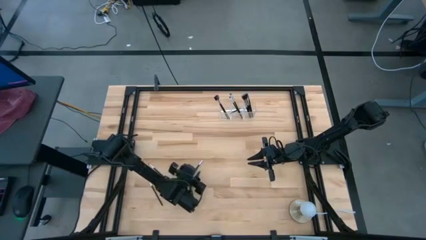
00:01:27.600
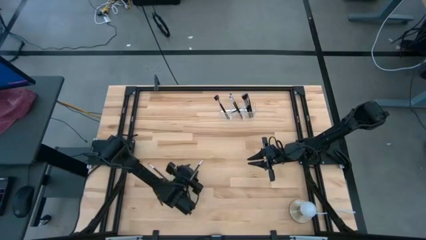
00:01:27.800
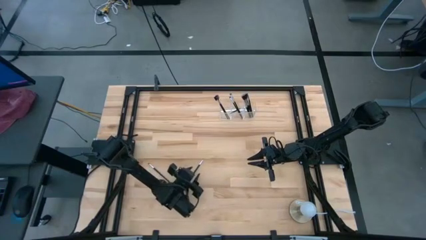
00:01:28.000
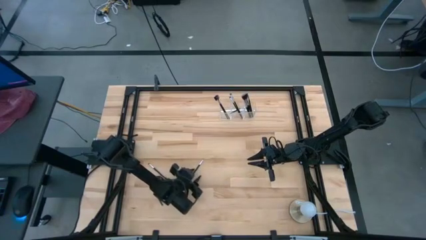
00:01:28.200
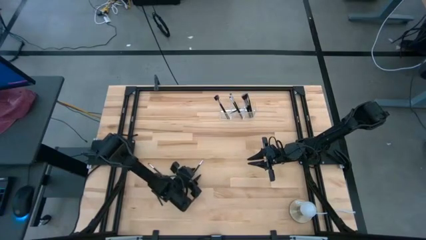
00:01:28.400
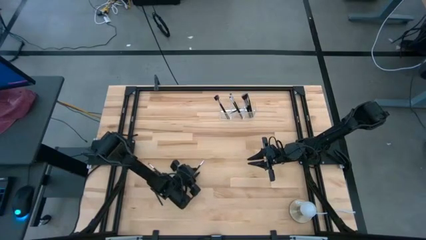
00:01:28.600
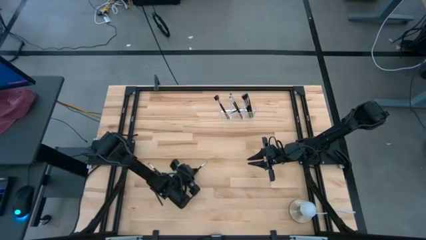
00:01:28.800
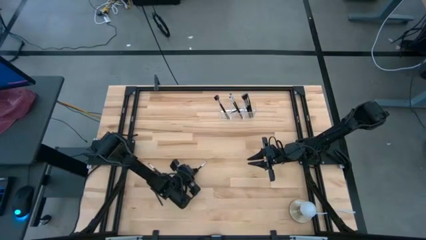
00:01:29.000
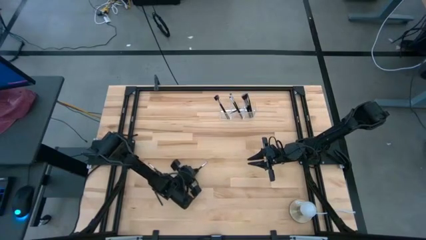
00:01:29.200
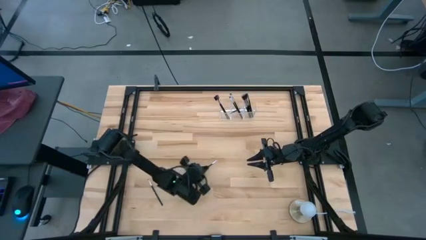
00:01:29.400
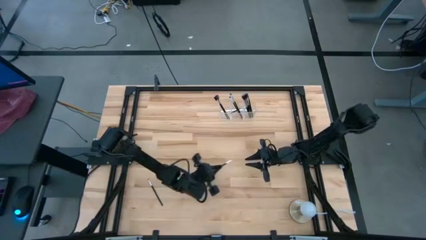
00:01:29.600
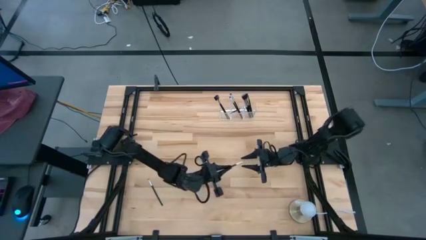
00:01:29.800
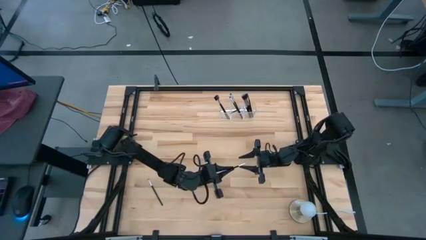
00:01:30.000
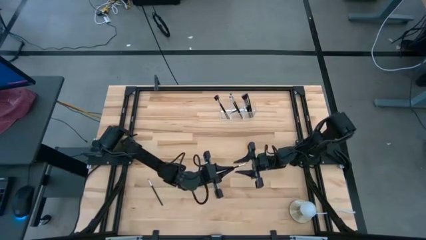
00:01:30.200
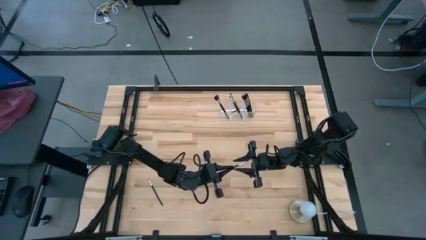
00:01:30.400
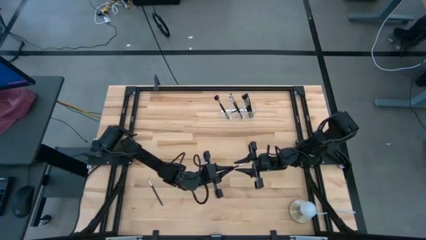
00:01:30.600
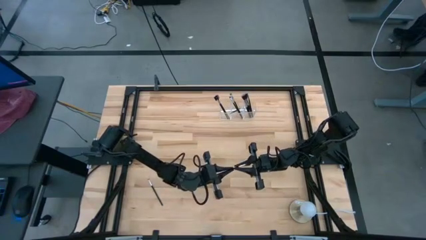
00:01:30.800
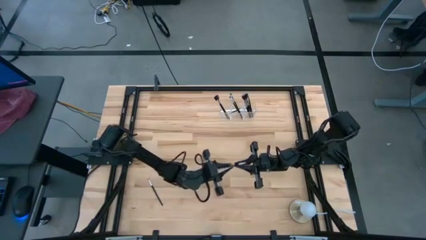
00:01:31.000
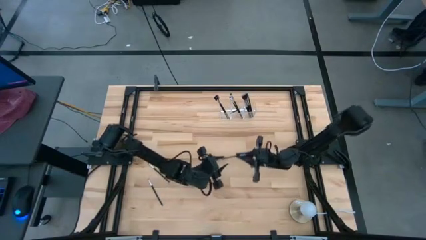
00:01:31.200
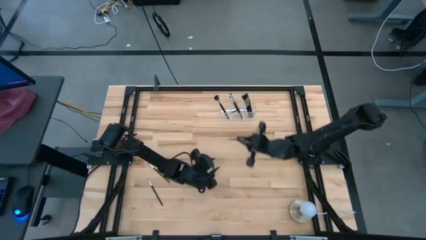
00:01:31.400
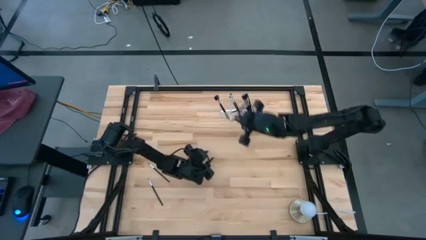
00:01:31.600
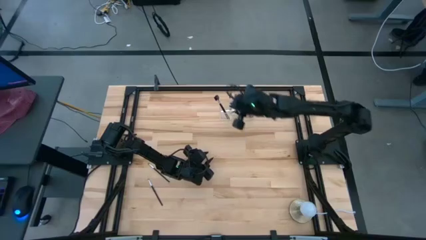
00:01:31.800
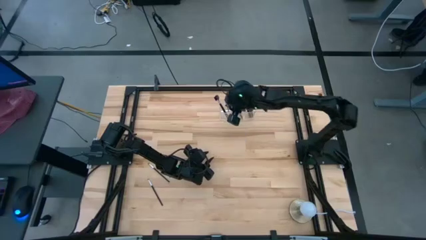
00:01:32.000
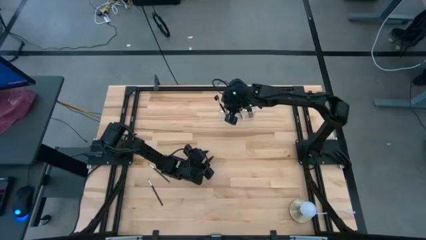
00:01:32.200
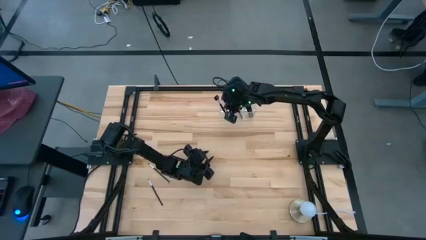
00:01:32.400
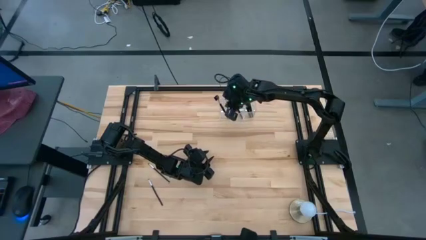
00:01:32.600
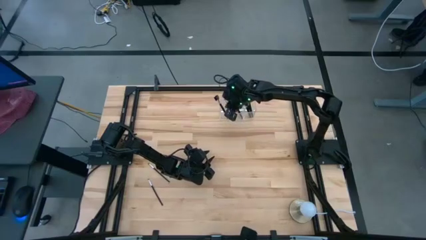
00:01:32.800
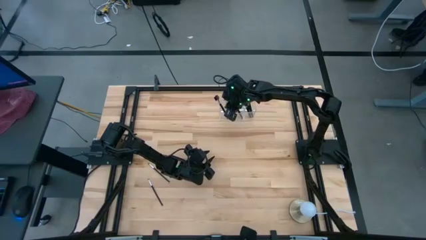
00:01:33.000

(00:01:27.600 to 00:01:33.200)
Task: Put items in baskets/containers
Put the black liner brush into the transparent organizer

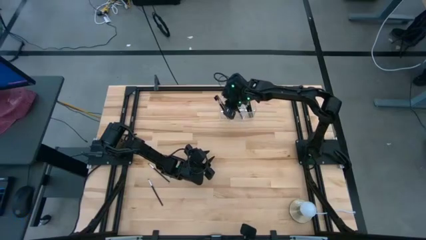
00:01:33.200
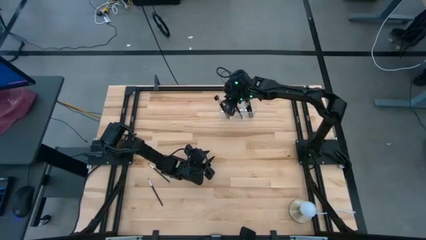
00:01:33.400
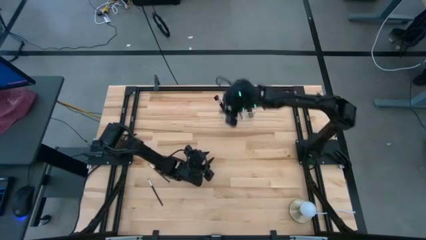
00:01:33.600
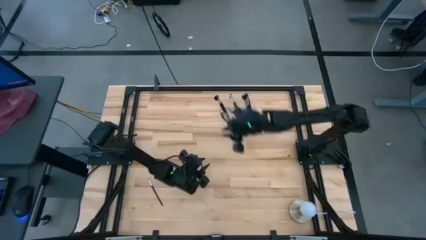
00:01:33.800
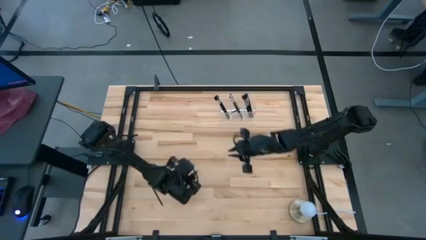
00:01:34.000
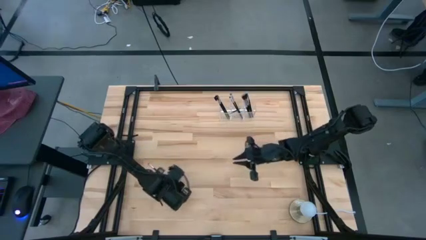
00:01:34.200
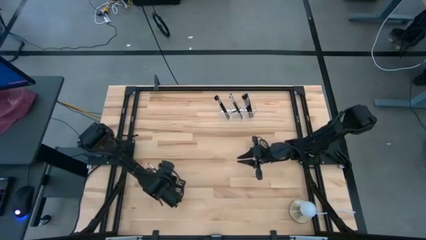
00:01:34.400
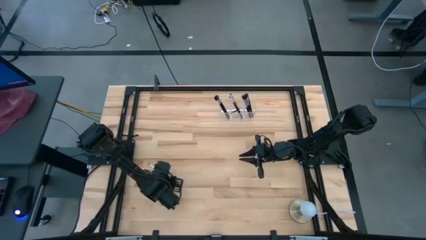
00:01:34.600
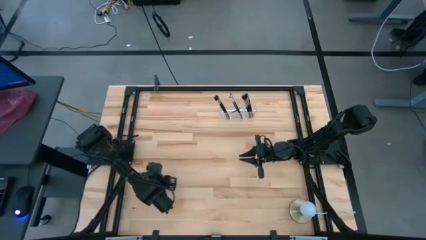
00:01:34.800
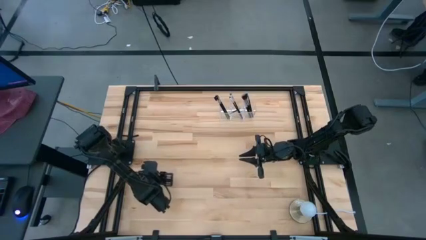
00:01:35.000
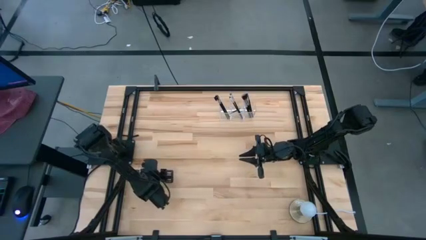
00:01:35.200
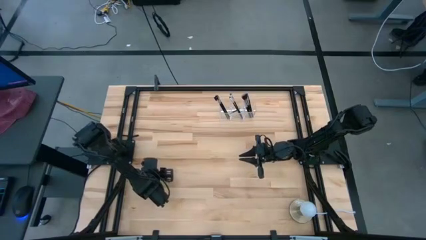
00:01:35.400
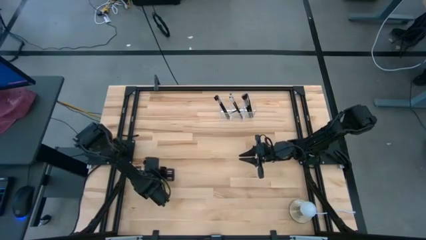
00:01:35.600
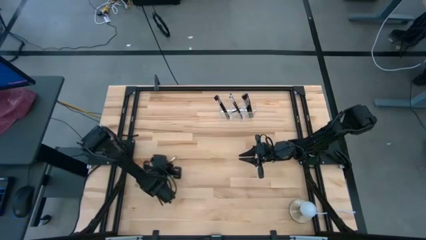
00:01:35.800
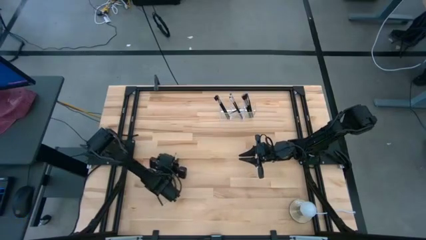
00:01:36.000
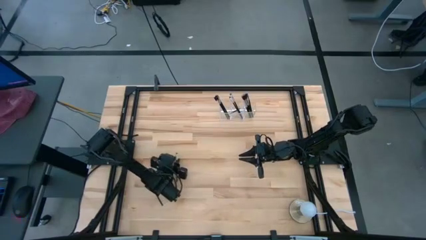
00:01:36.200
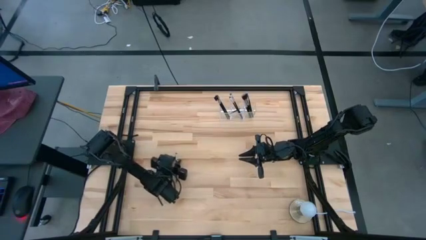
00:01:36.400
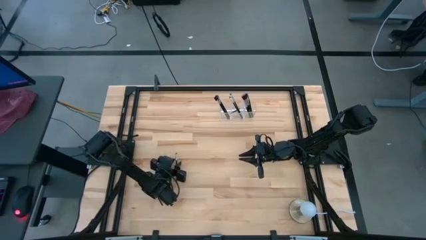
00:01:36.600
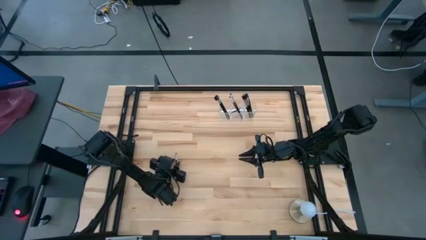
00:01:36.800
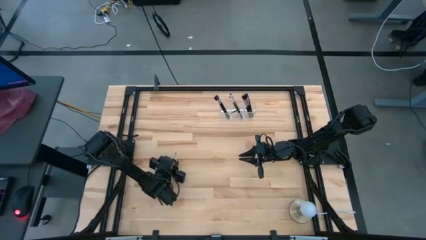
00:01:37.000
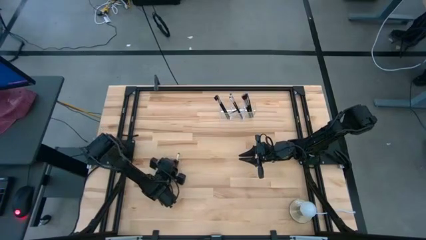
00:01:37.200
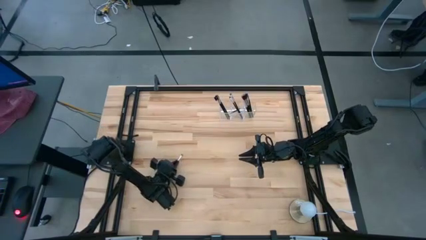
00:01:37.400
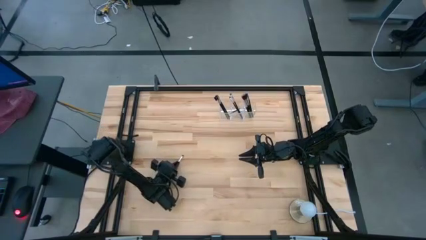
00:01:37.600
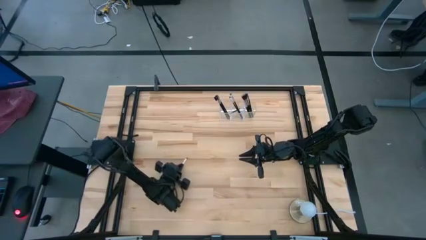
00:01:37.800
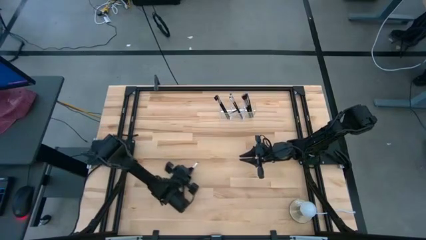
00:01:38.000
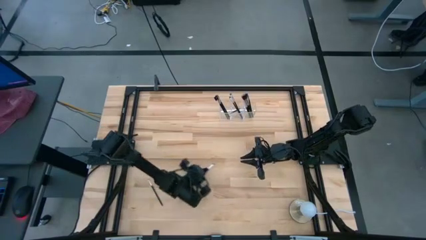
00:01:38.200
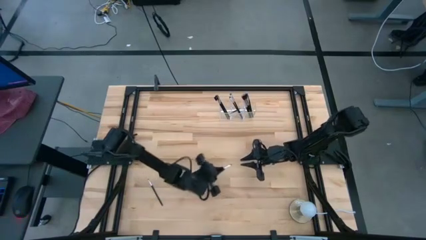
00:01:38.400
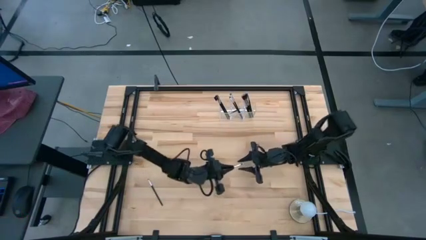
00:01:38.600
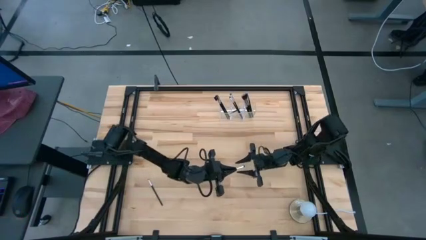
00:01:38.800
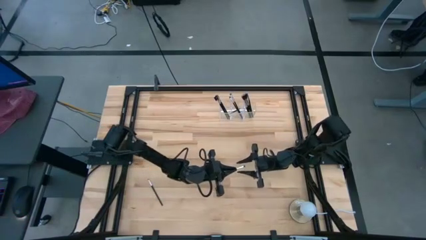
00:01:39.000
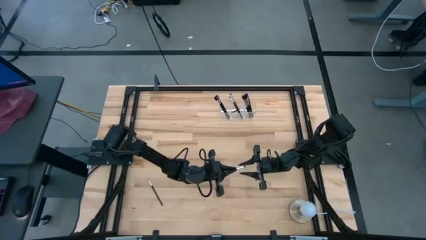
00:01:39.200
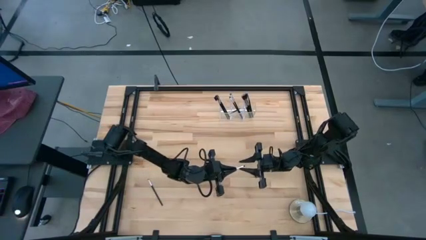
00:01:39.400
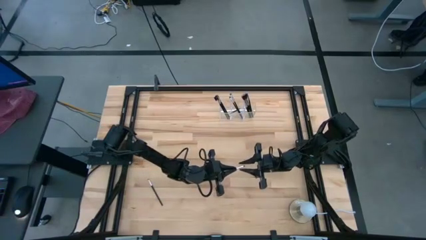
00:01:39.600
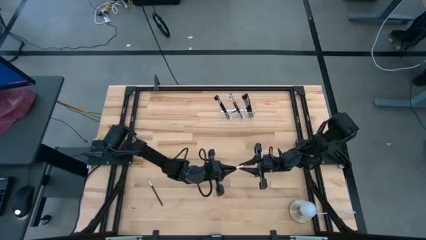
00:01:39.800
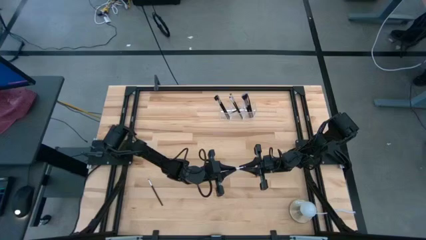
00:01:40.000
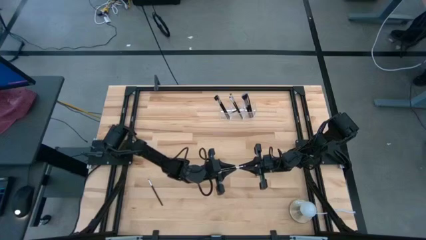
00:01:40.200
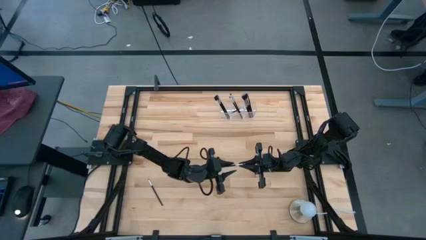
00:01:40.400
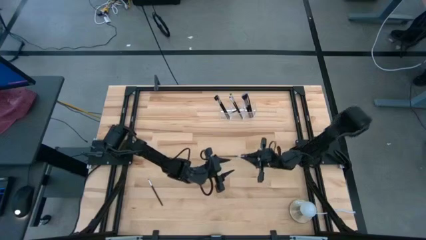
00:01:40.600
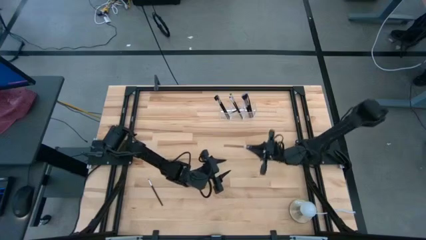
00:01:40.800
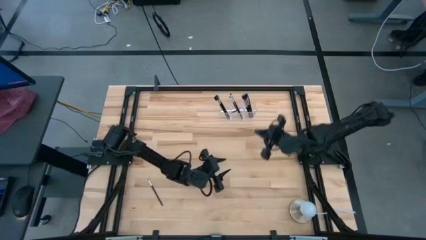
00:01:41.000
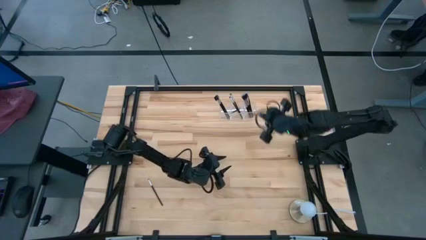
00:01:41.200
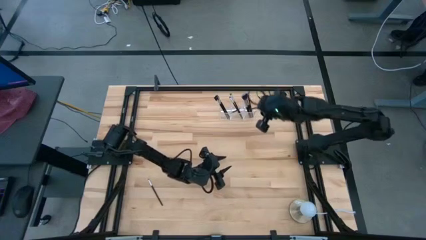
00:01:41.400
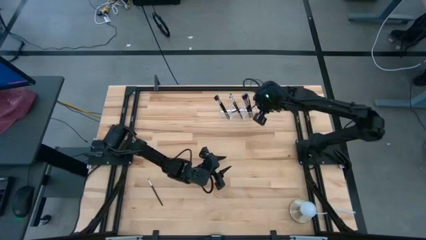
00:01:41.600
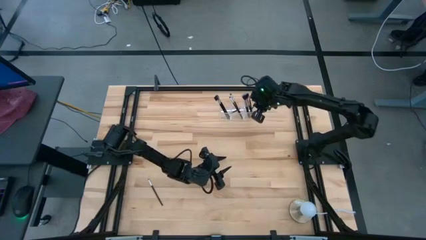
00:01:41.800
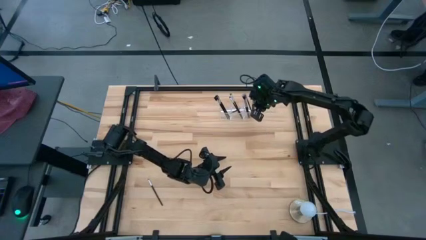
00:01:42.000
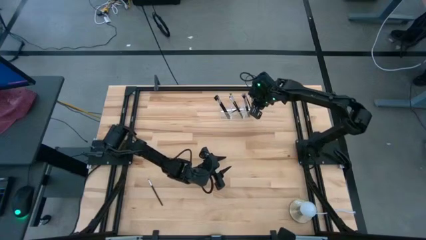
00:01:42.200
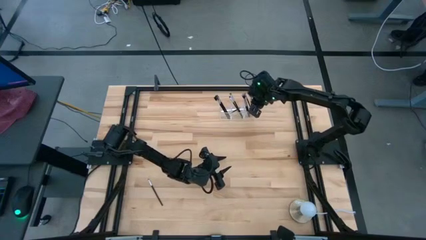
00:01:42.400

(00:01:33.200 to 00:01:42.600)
Put the black eyeshadow brush into the transparent organizer

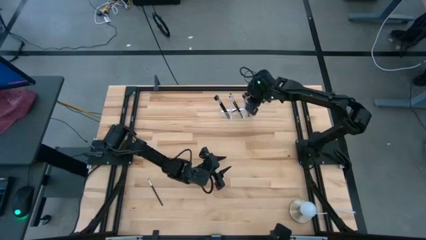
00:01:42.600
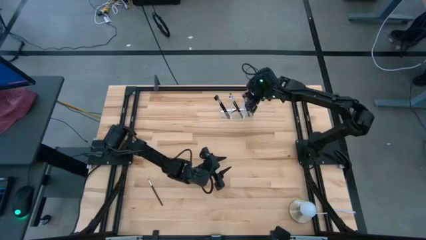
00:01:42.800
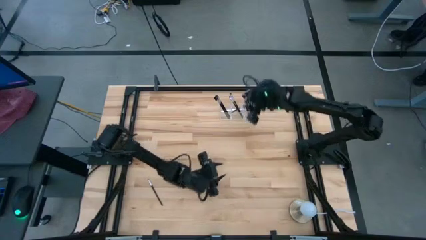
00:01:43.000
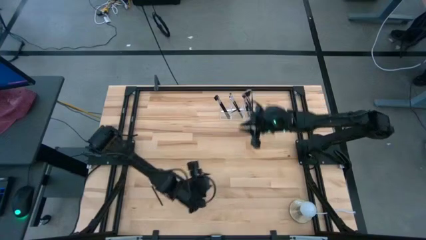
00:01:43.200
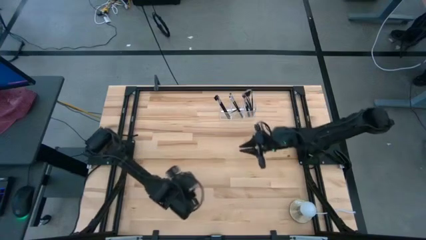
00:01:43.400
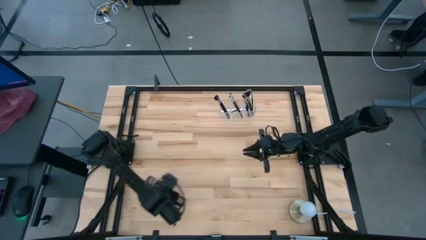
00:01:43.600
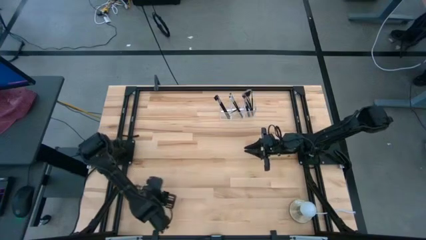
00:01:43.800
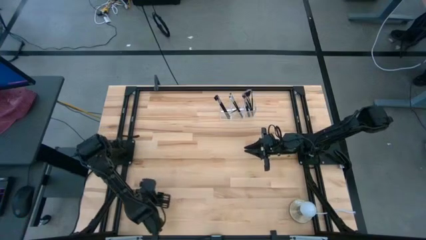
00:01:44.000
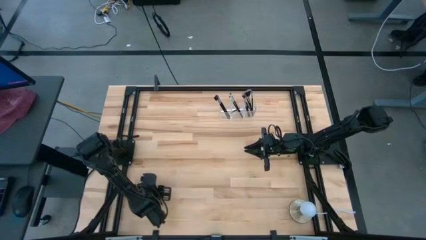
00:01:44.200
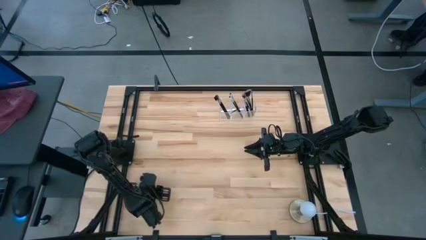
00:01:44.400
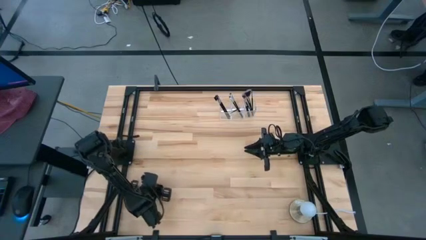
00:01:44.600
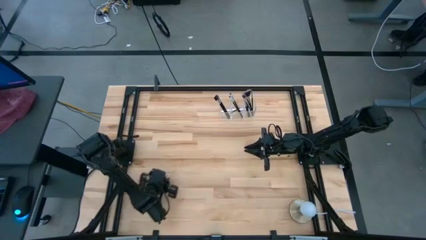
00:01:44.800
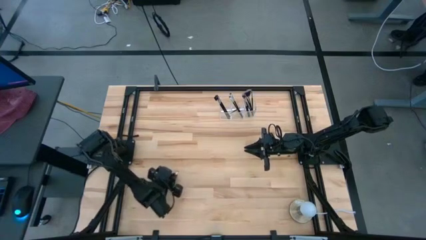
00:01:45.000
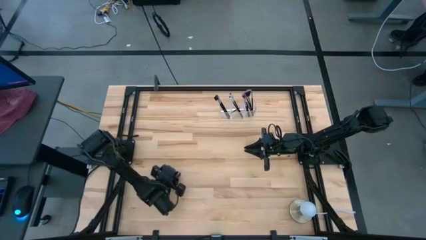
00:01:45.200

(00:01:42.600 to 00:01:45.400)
Put the black eyeshadow brush into the transparent organizer
